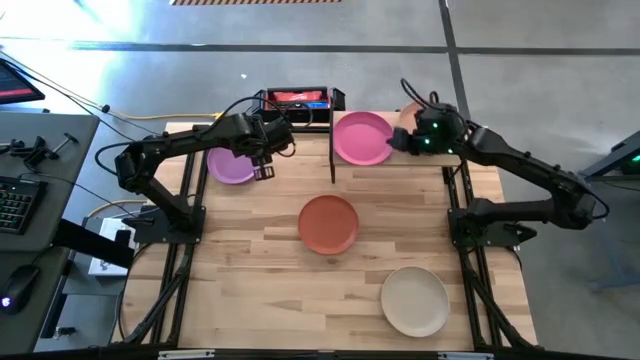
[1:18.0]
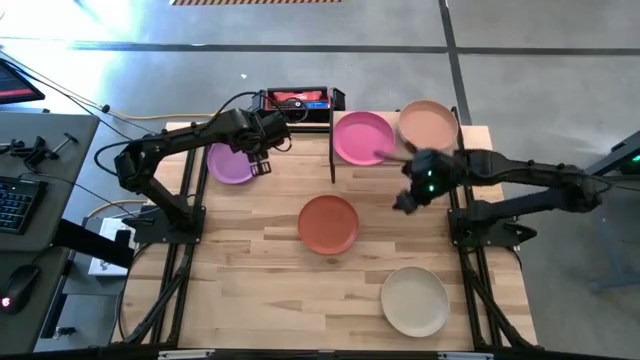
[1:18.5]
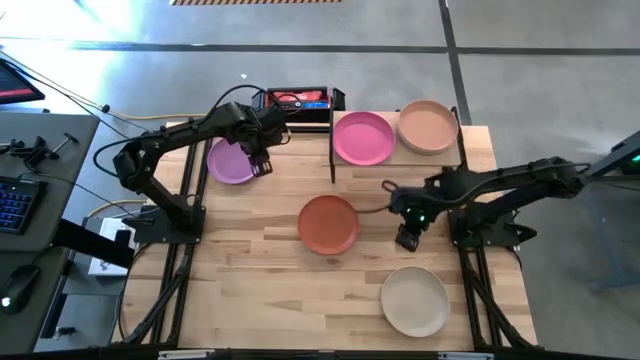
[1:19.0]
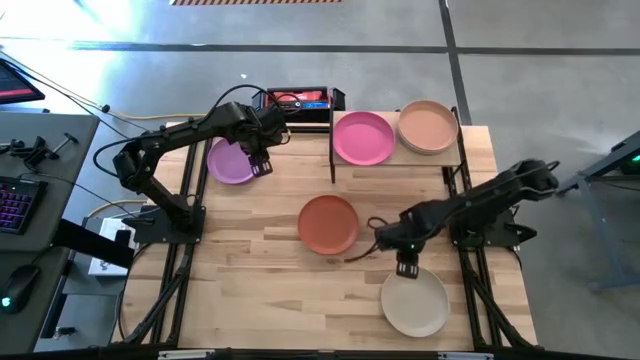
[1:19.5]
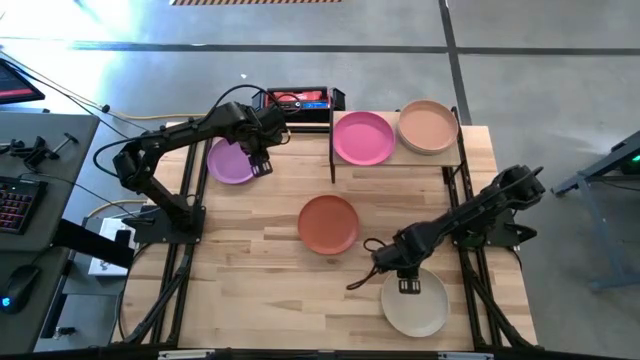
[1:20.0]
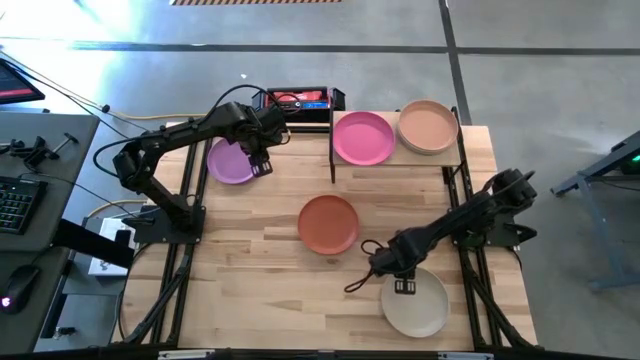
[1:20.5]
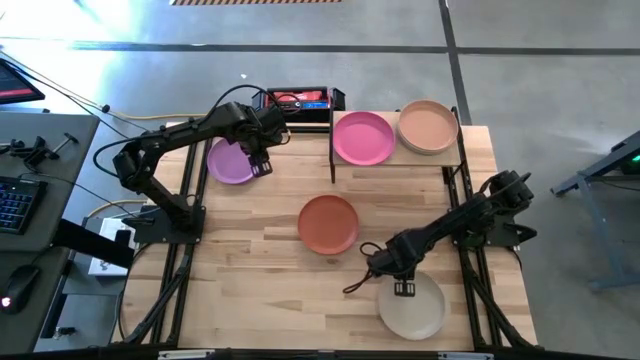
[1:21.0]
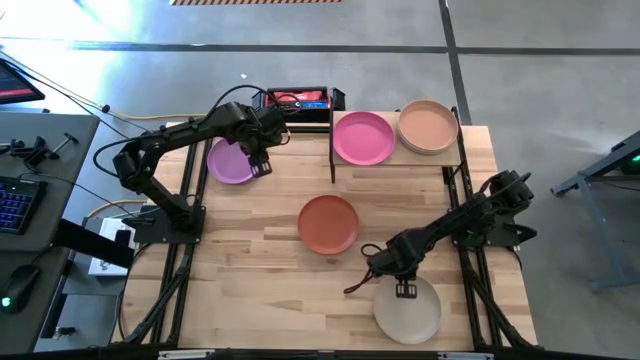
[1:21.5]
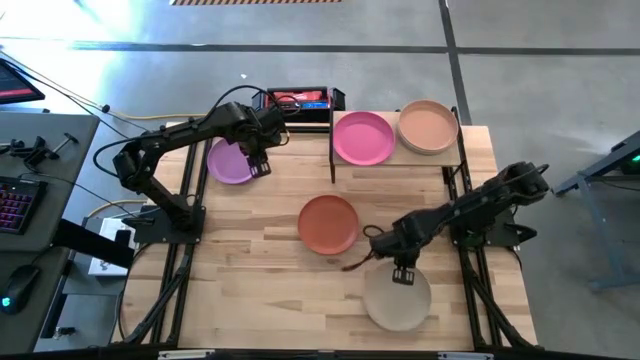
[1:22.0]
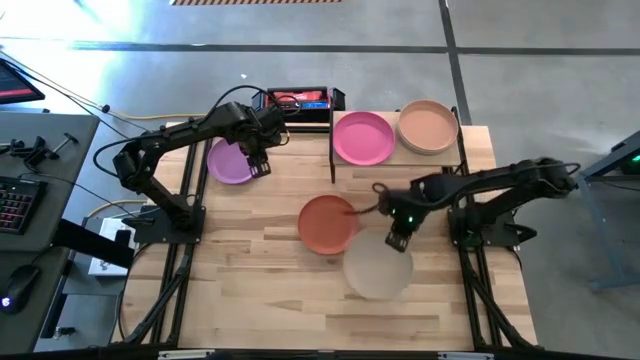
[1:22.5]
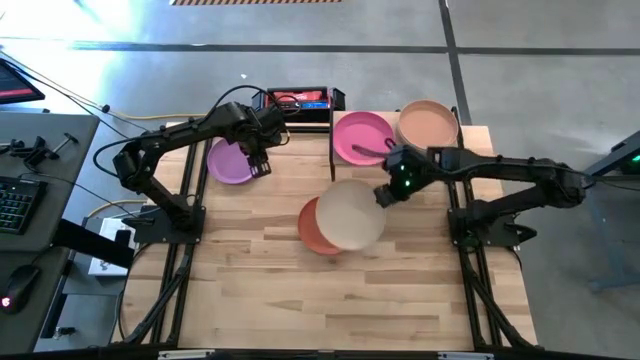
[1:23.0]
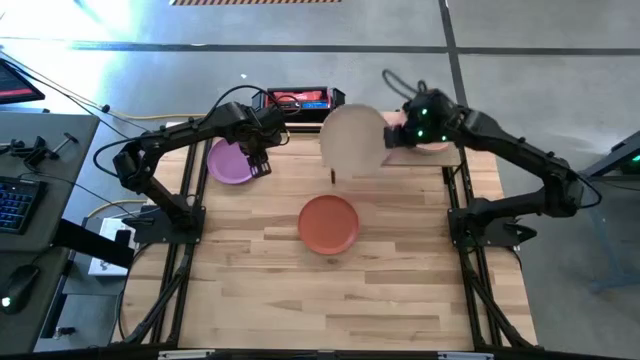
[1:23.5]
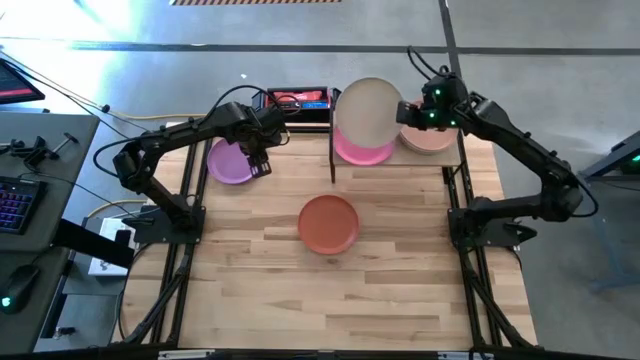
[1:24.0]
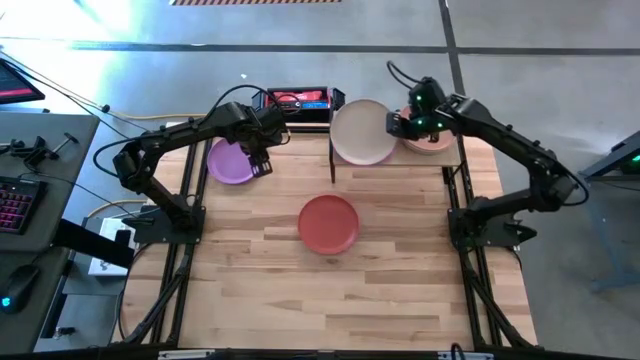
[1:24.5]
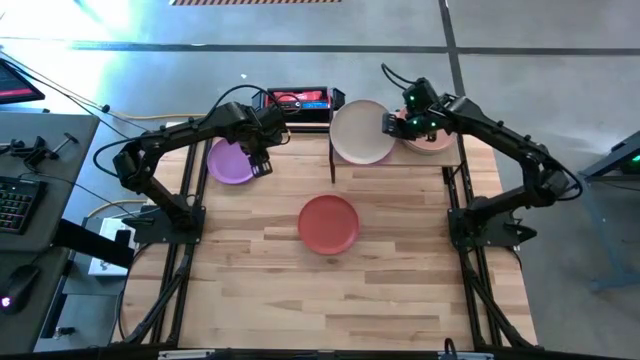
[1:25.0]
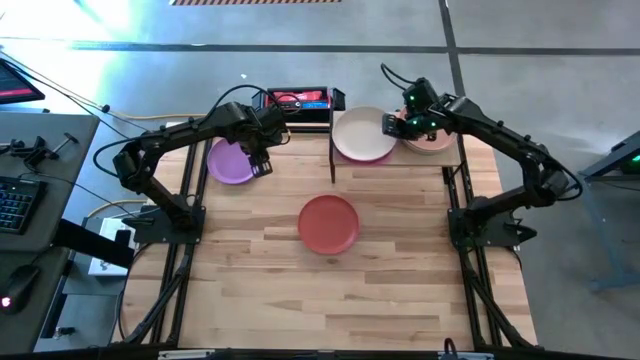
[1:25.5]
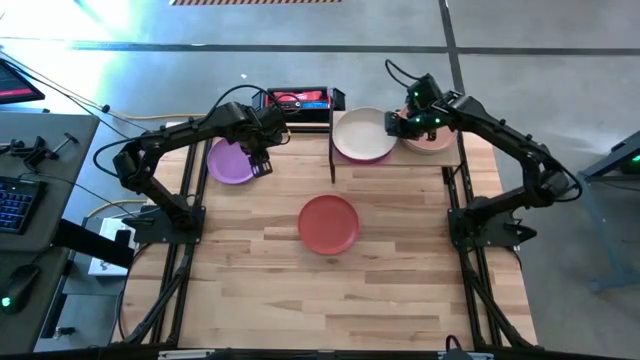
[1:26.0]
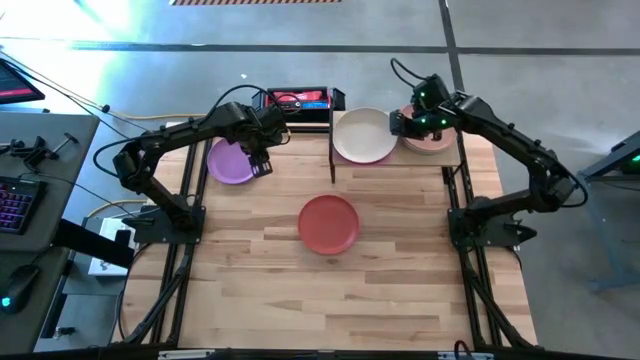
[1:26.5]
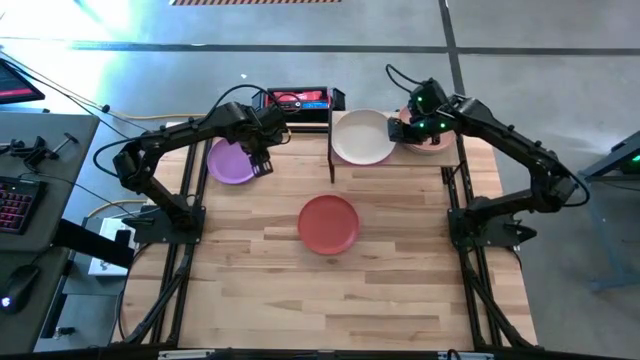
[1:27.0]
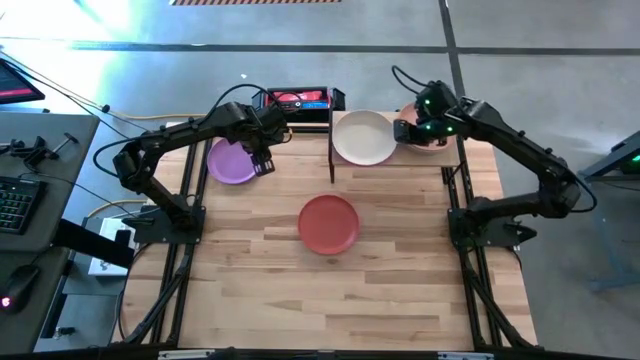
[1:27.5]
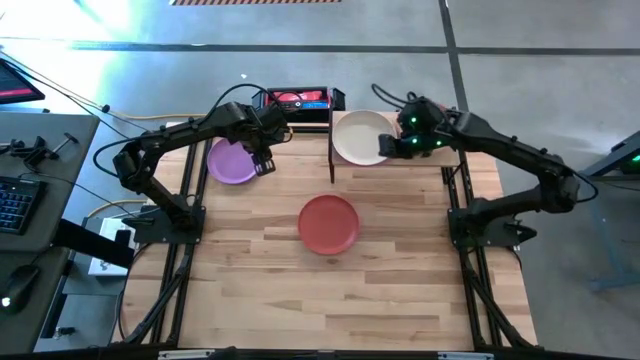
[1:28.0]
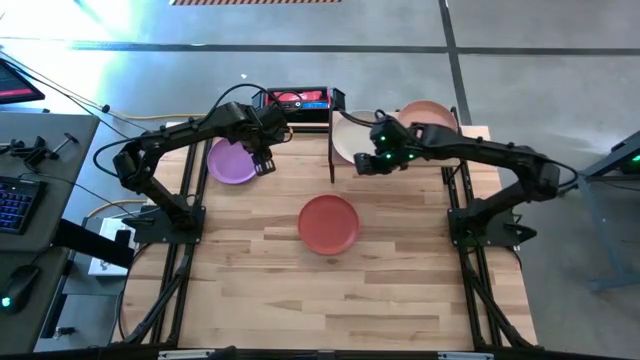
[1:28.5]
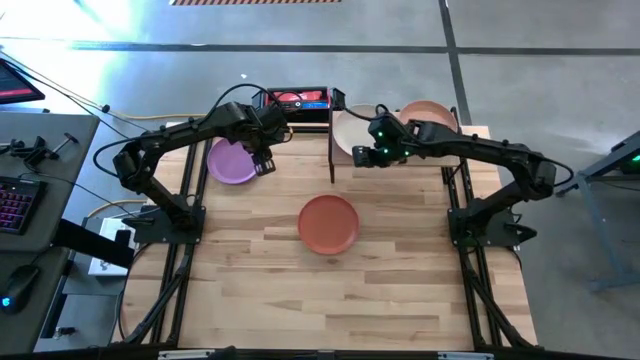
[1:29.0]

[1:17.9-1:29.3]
Task: Place and stack plates onto a shelf
Stack the gray plate on top of the pink plate on the shelf

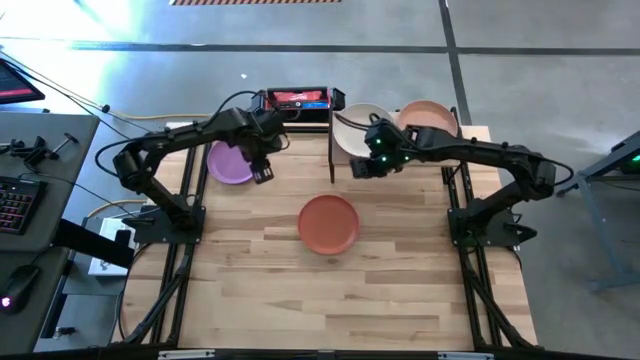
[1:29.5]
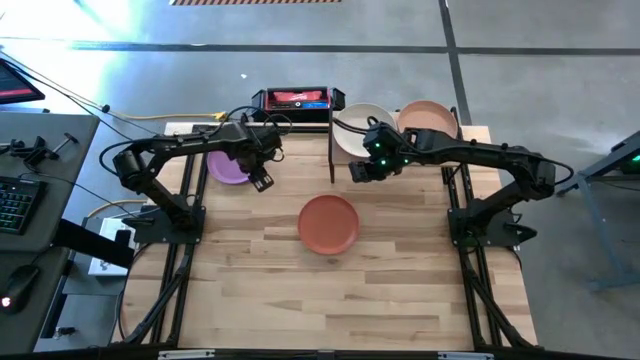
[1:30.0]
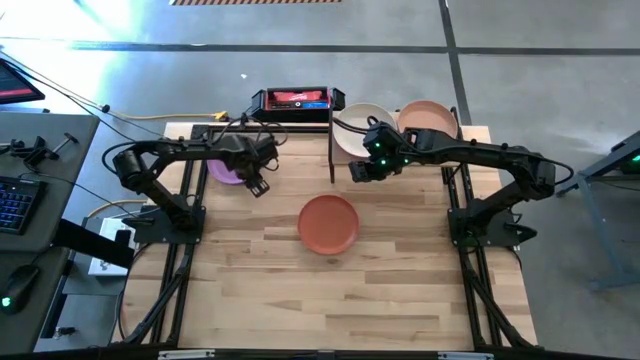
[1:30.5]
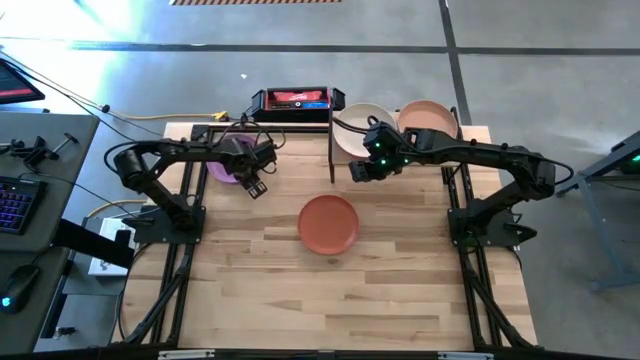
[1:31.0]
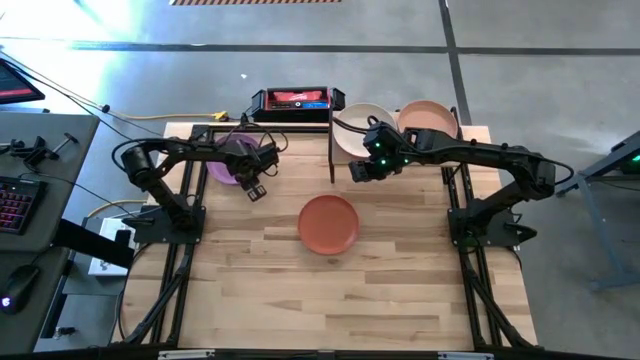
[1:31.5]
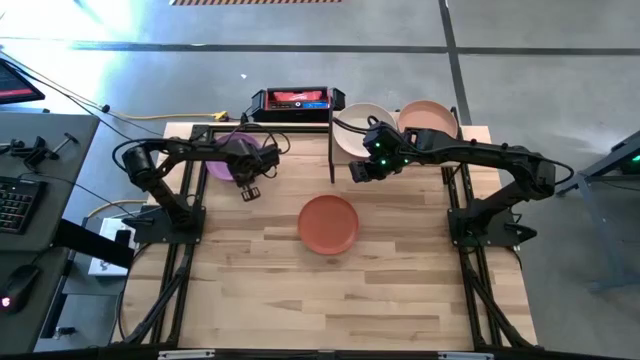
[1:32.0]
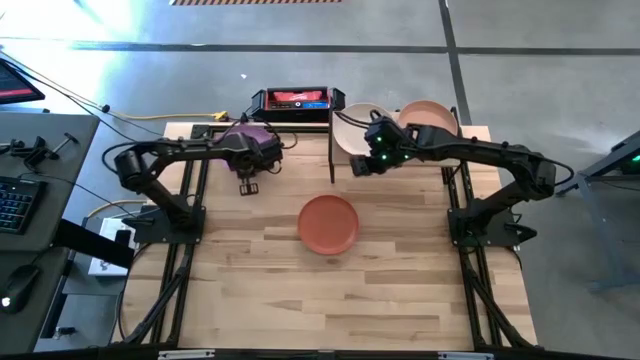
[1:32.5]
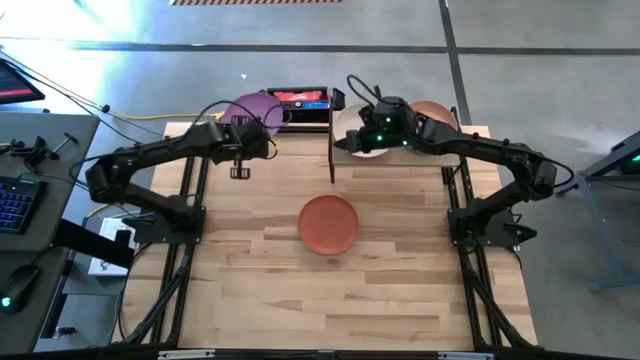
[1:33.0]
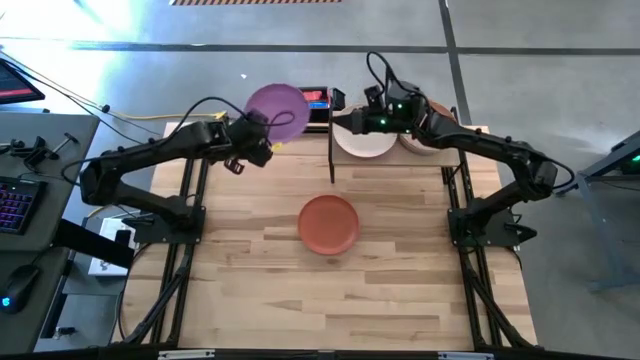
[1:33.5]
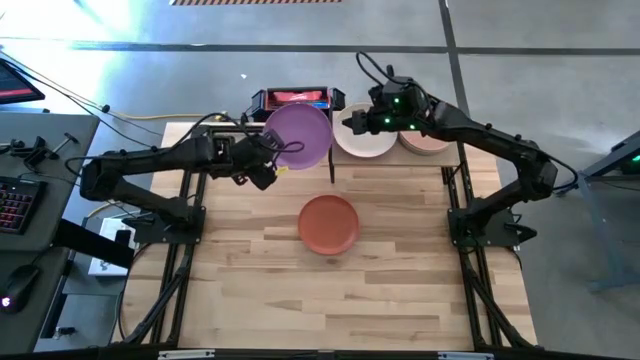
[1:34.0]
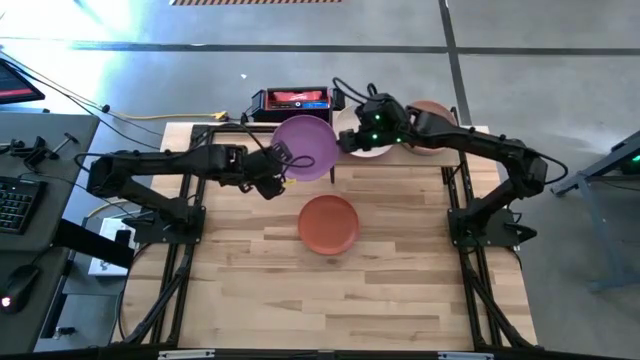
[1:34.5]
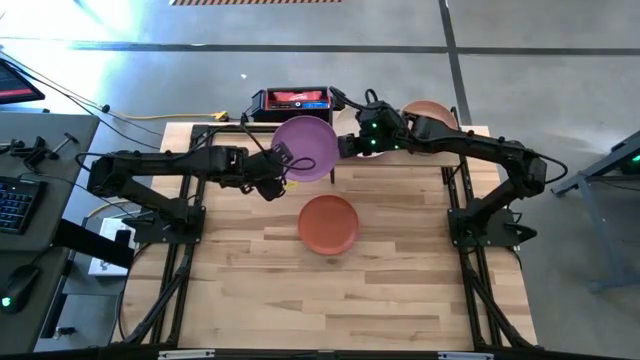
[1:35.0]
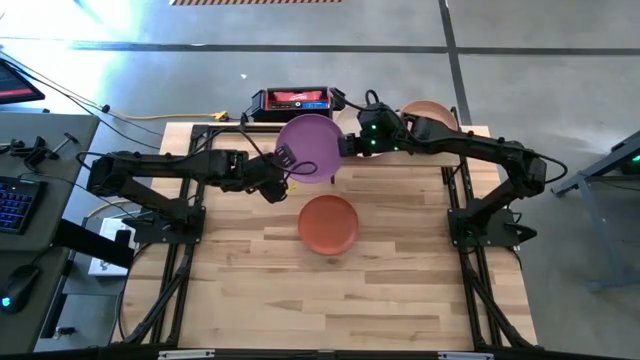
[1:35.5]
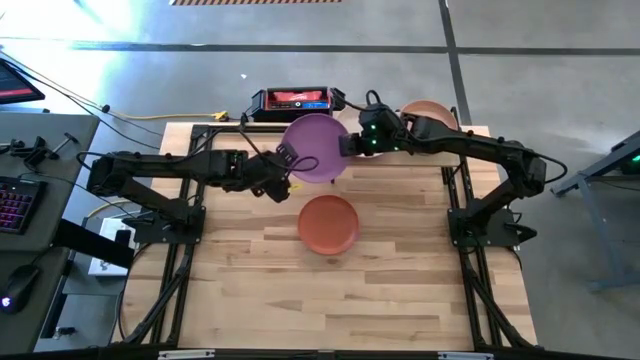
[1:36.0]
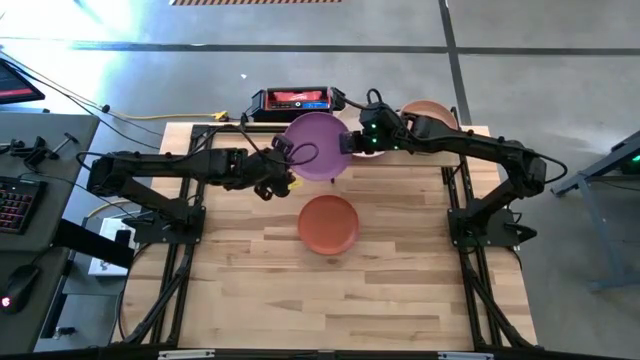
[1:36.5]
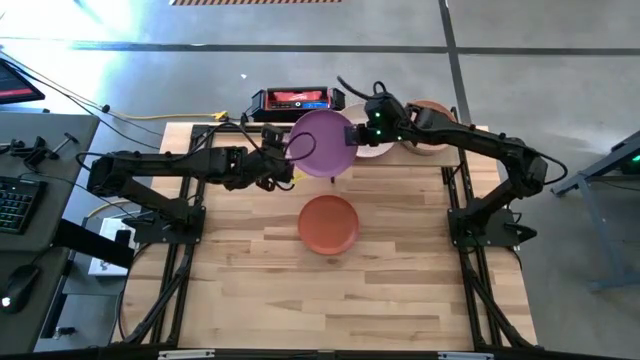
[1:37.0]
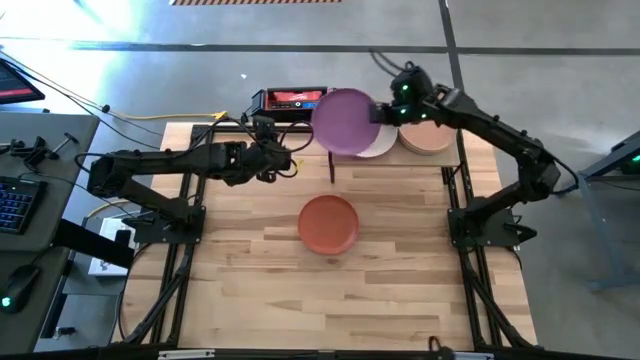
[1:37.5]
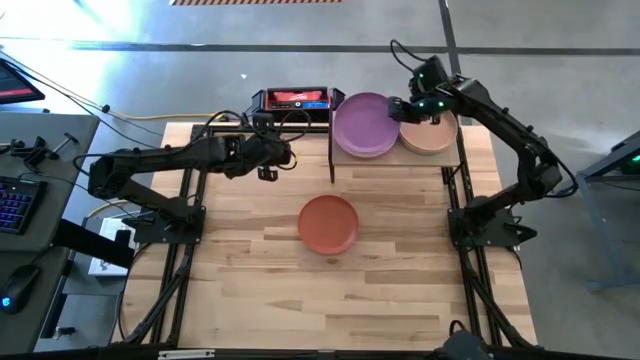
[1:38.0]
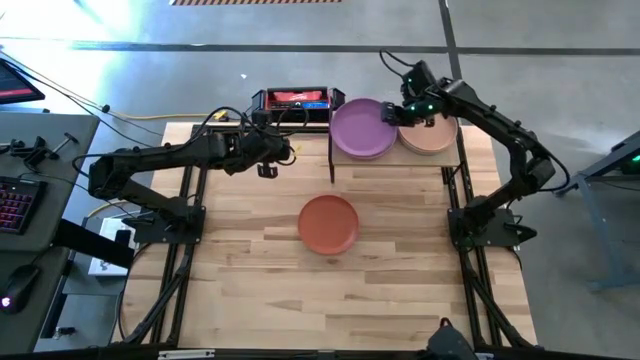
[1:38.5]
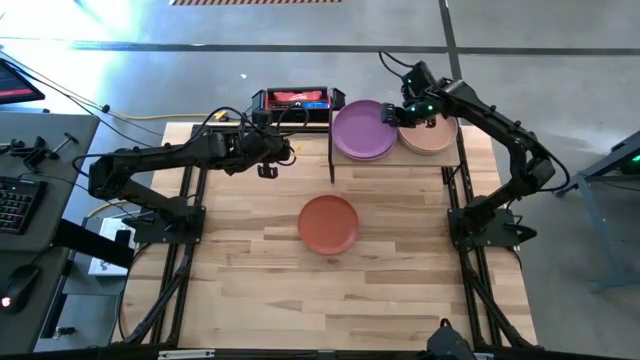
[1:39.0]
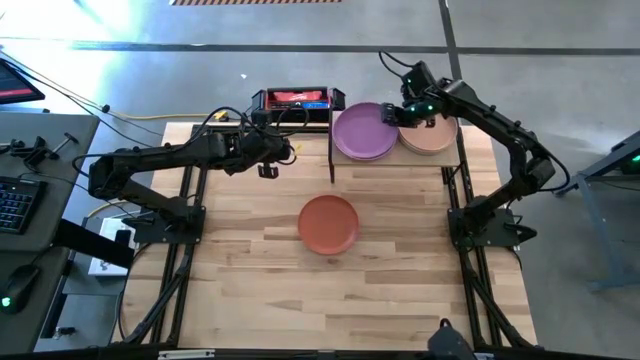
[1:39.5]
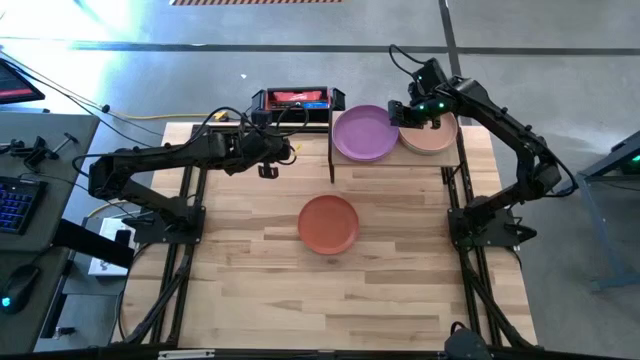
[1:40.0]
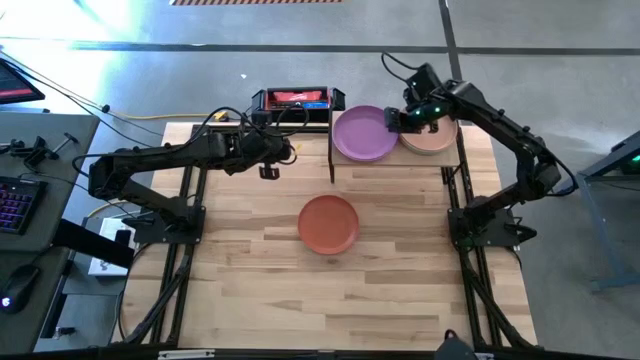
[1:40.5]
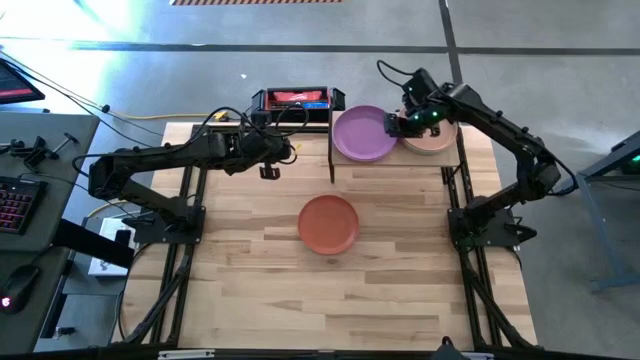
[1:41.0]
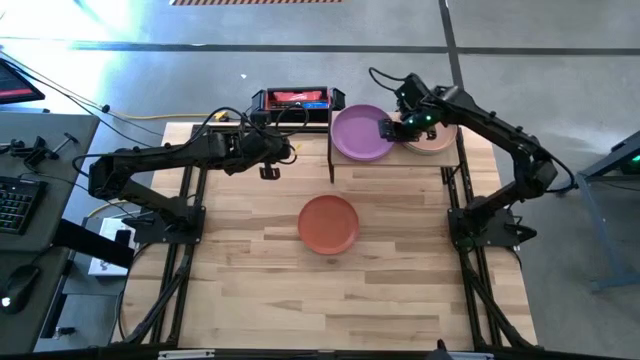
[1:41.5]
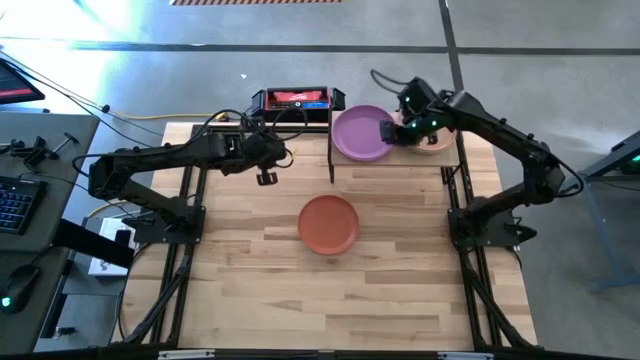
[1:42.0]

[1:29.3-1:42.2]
Stack the violet plate on top of the gray plate on the shelf
